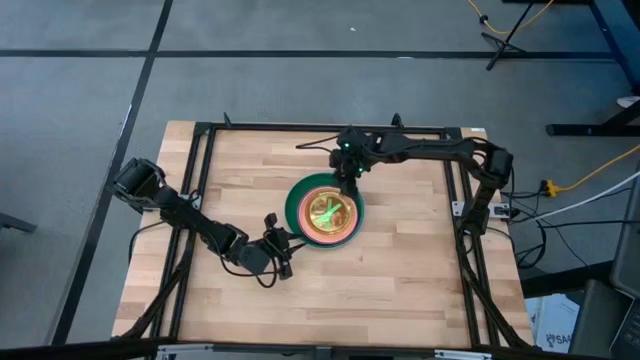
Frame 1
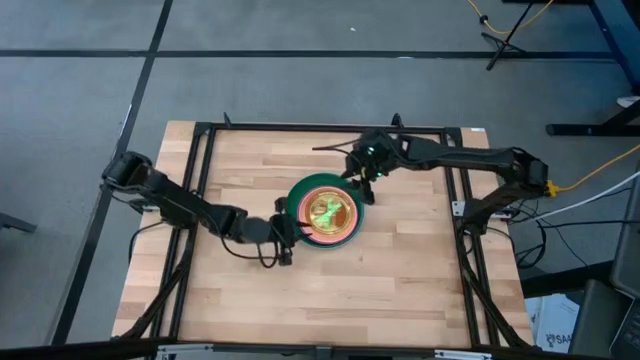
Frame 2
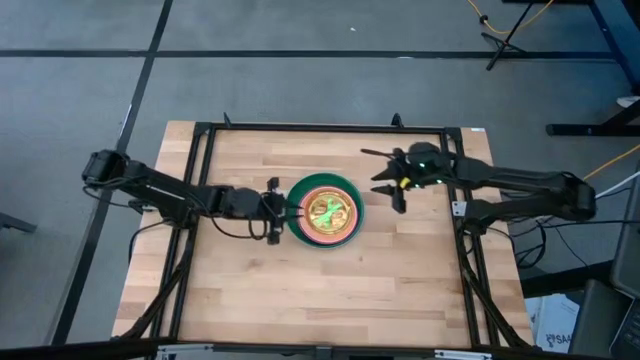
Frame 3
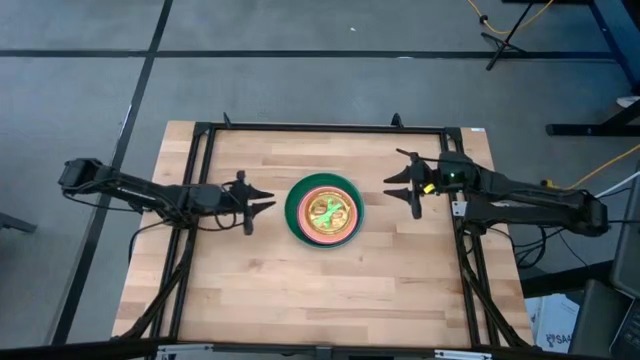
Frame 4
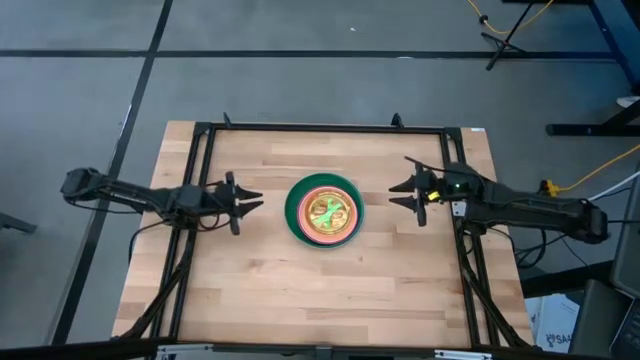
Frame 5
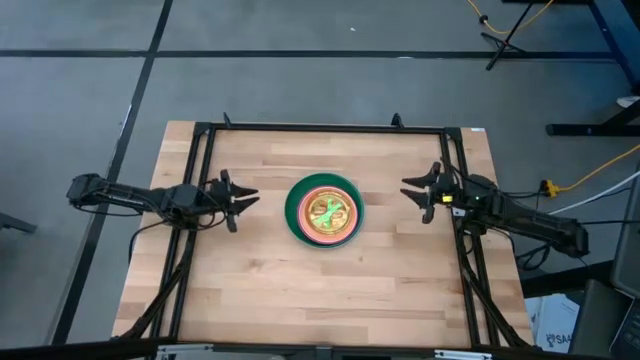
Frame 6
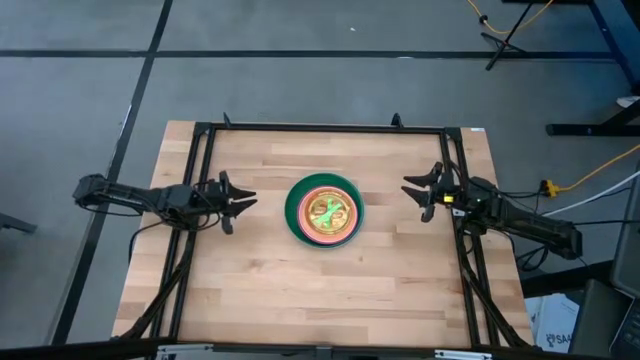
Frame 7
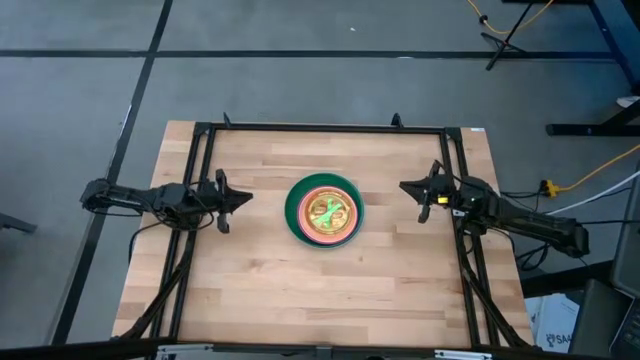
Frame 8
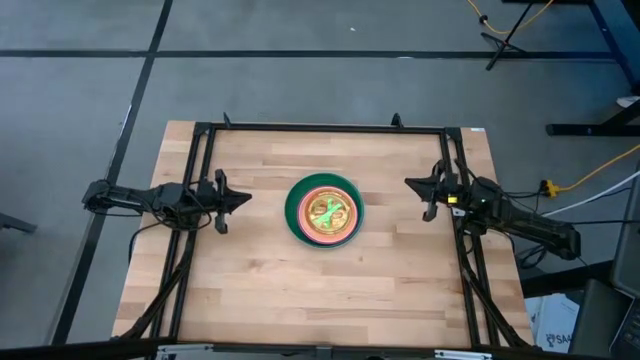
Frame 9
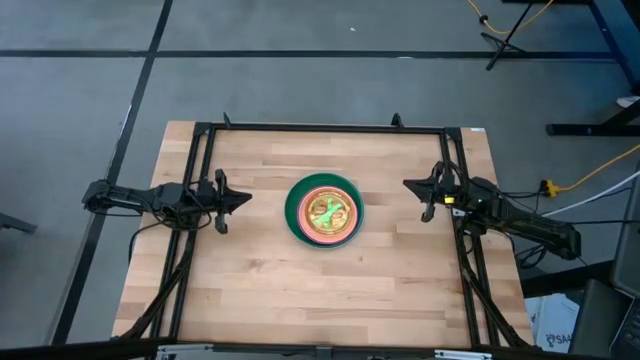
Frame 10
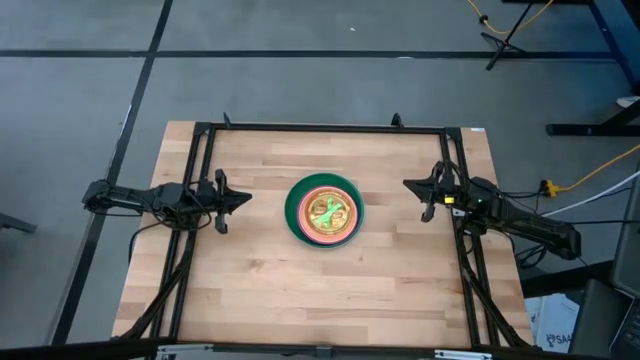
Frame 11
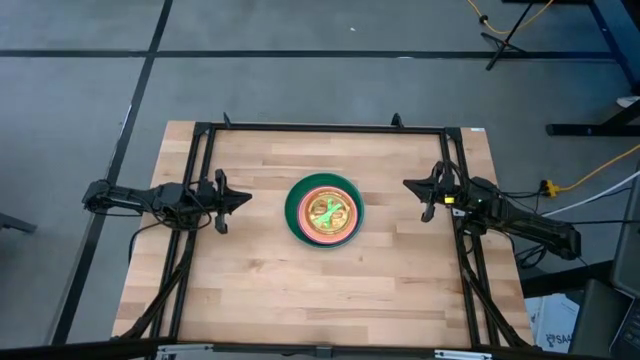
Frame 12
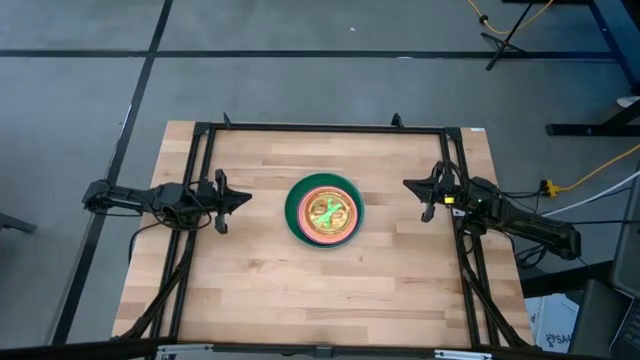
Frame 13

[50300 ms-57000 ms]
Task: Stack plastic plates
Return to Home Position

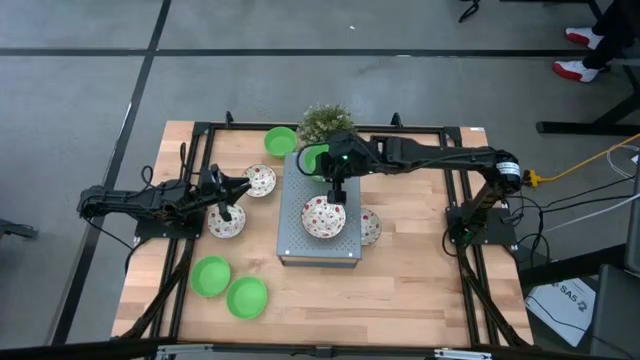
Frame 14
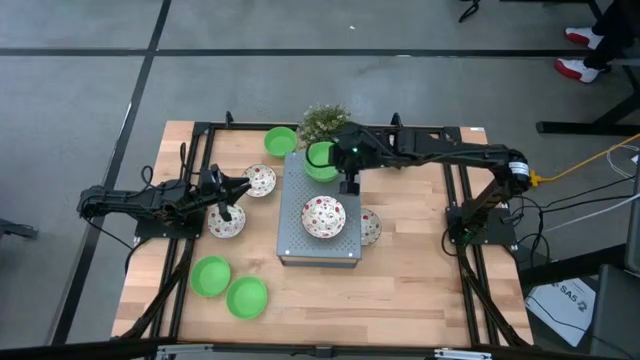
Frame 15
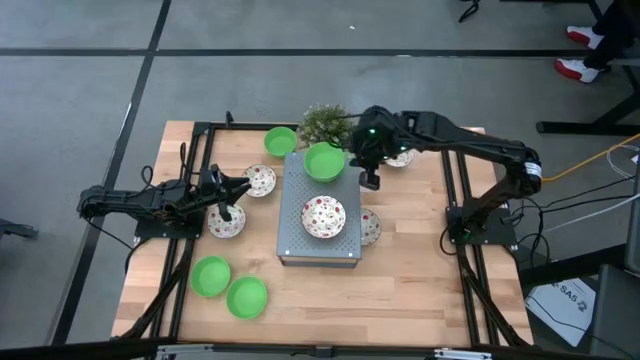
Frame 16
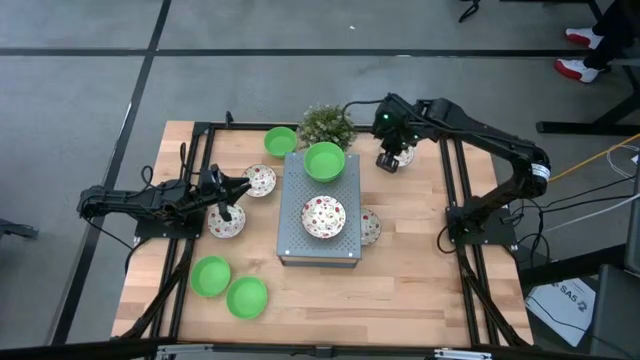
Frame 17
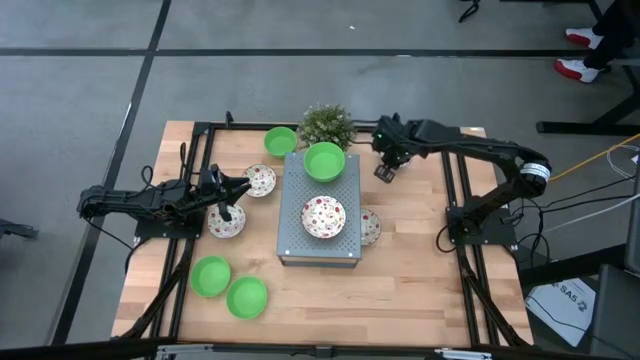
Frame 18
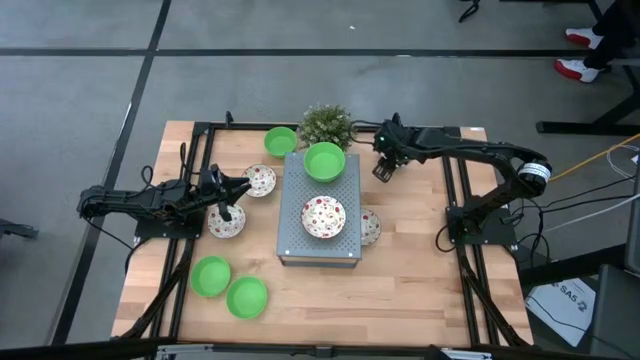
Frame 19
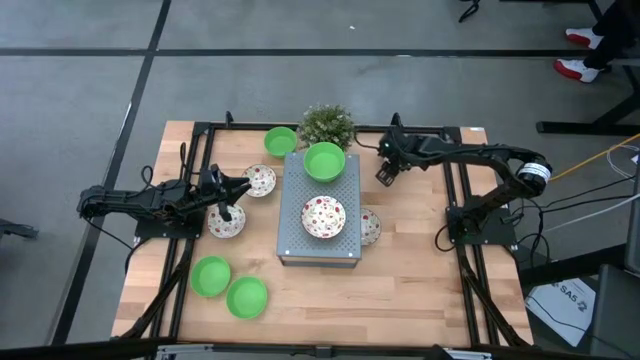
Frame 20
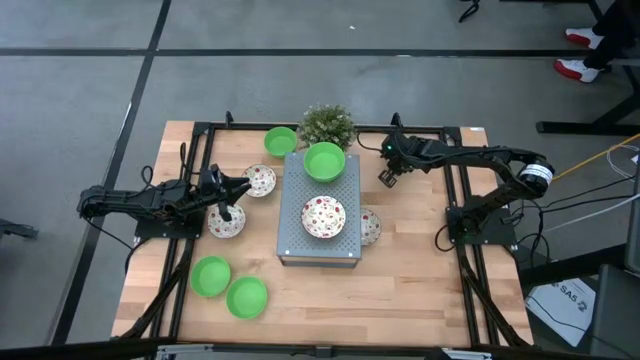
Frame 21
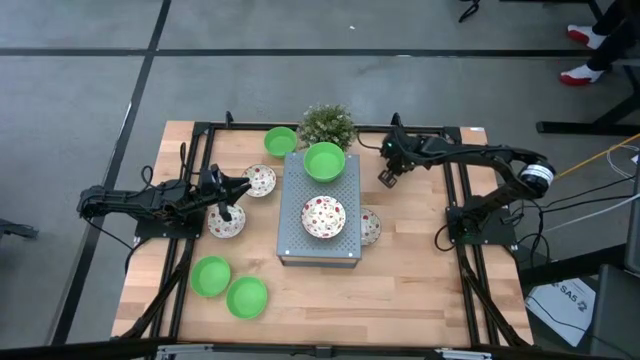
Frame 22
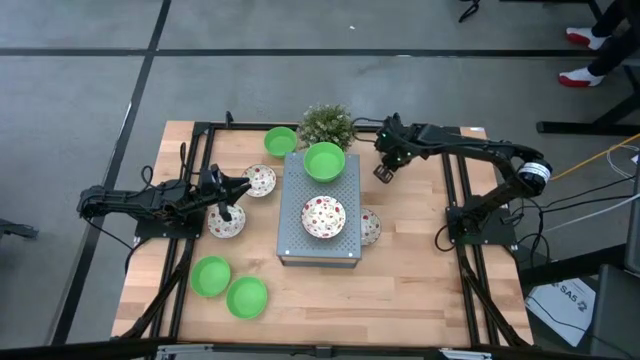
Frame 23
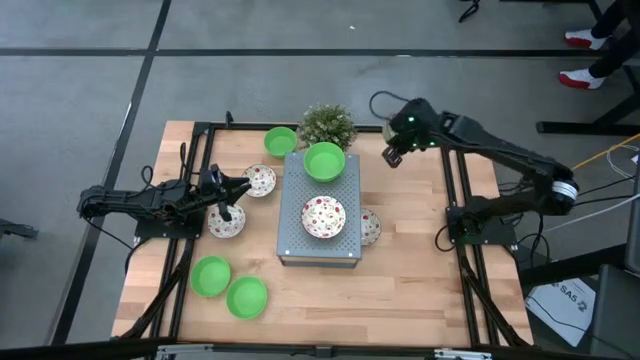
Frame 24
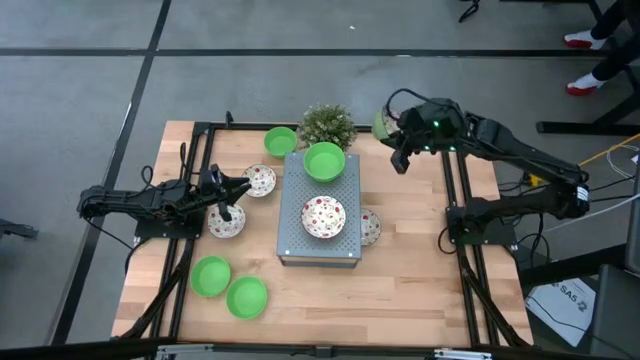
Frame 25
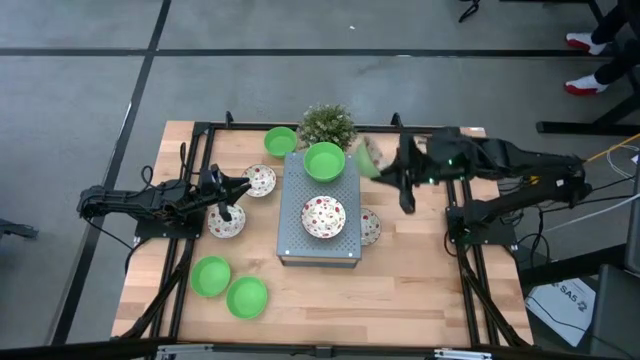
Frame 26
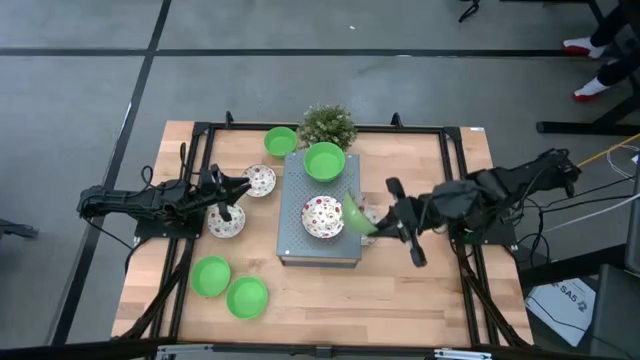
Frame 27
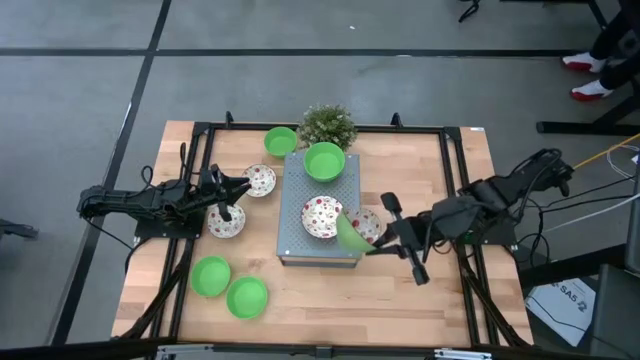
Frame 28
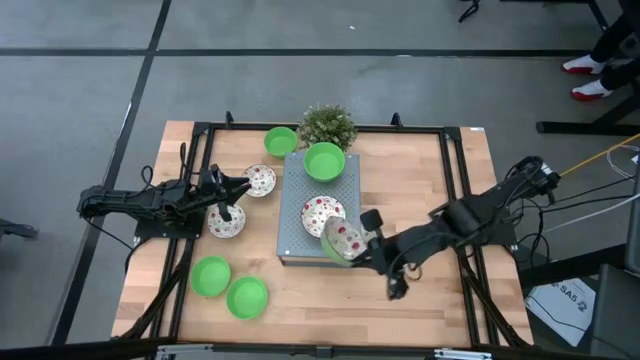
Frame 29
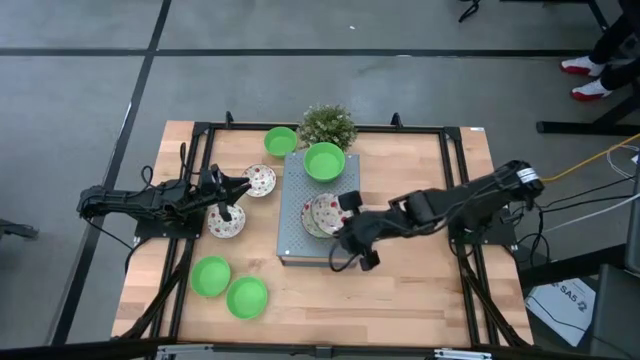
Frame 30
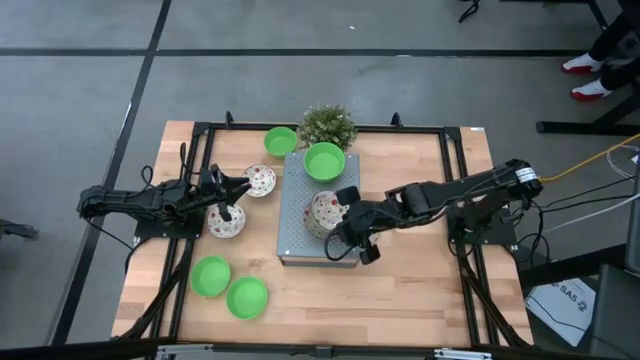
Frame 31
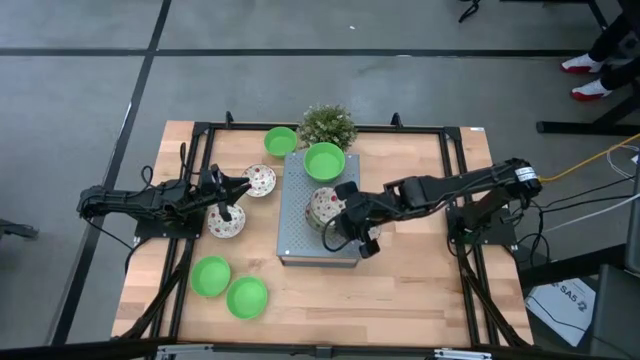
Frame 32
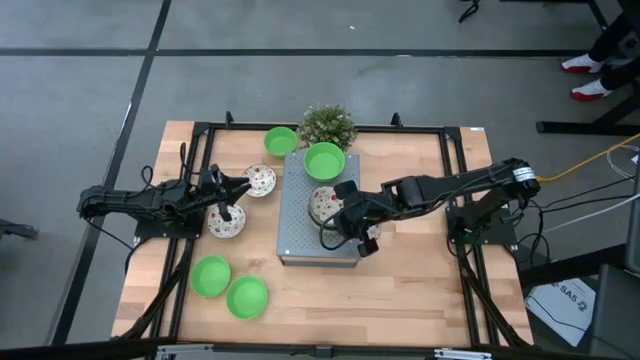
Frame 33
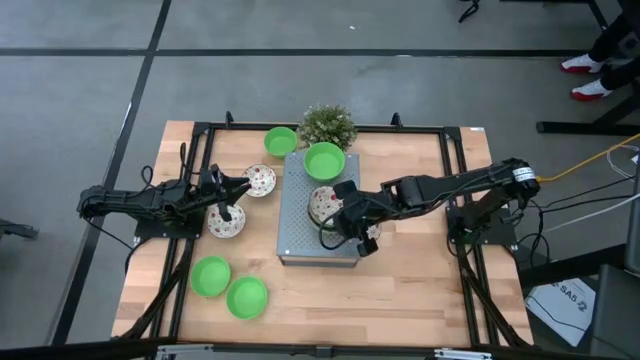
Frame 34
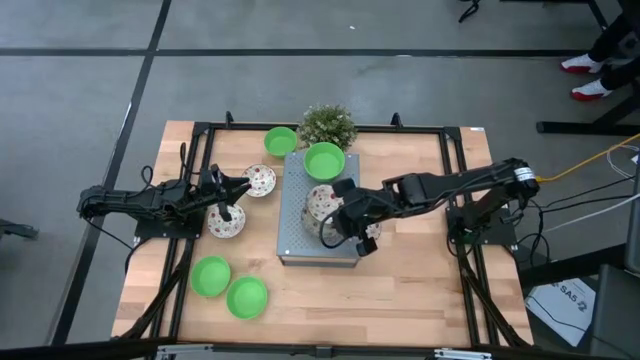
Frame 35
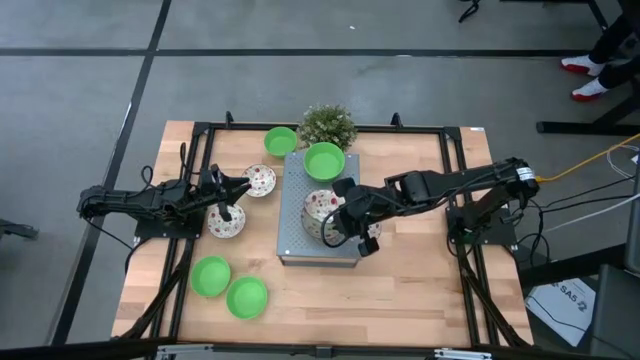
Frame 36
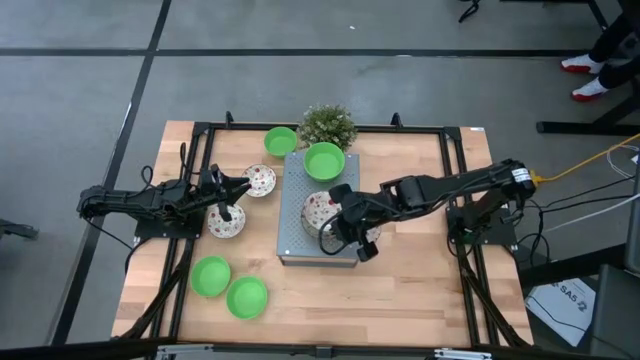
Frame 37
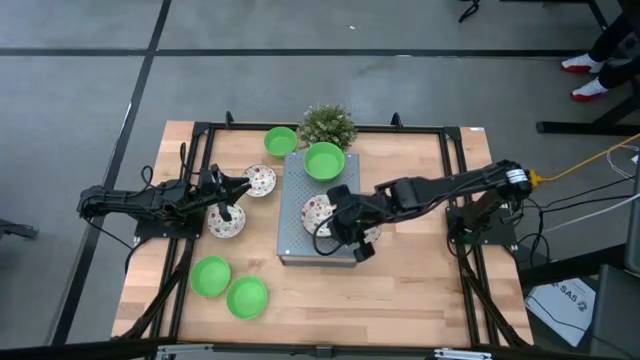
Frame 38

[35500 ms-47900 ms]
Task: Pick & Place Mini bowls
Stack the red patterned bowl on the red patterned bowl on the shelf

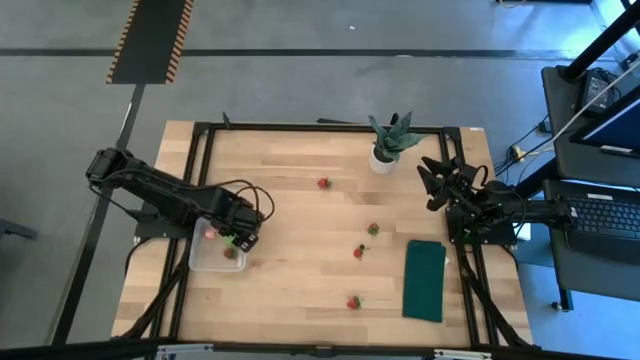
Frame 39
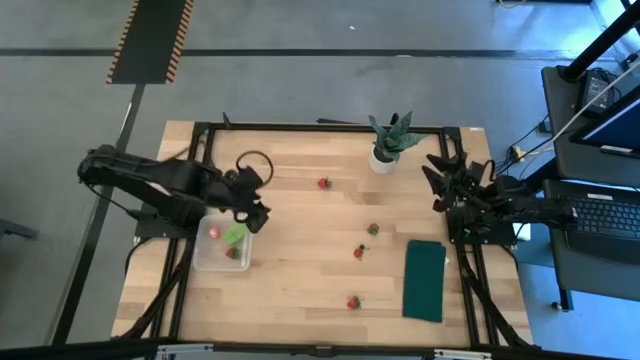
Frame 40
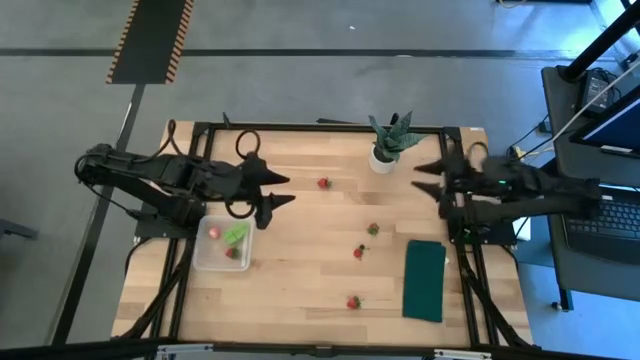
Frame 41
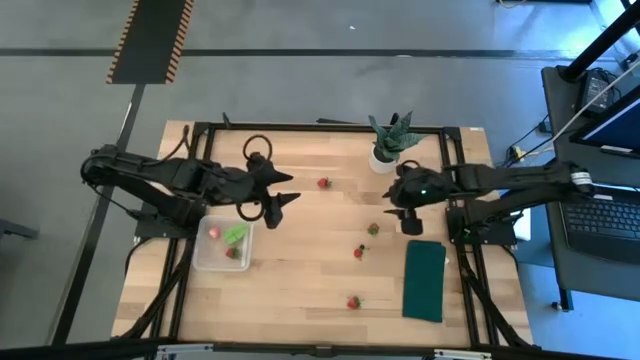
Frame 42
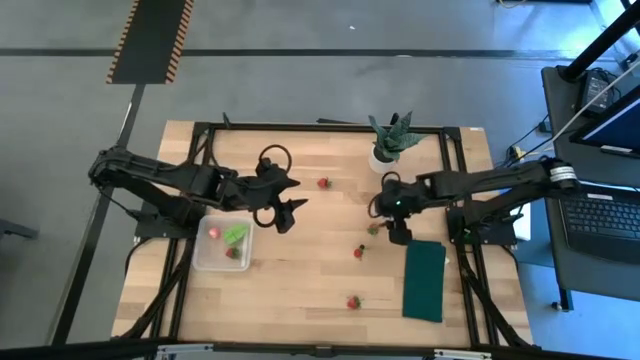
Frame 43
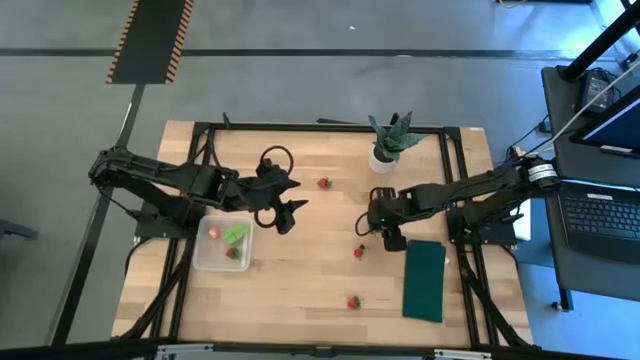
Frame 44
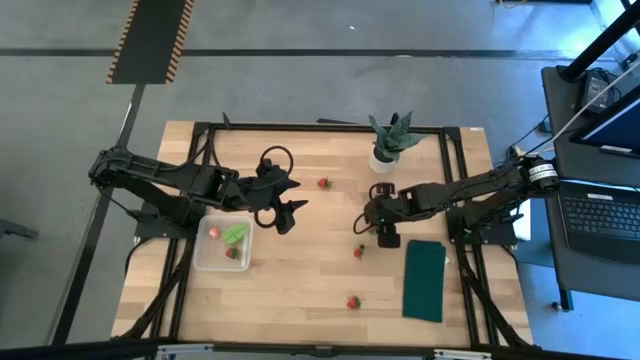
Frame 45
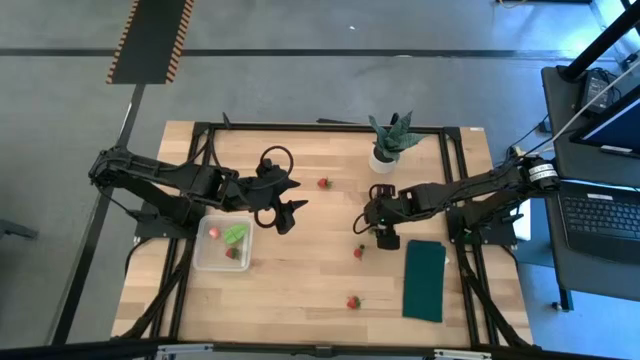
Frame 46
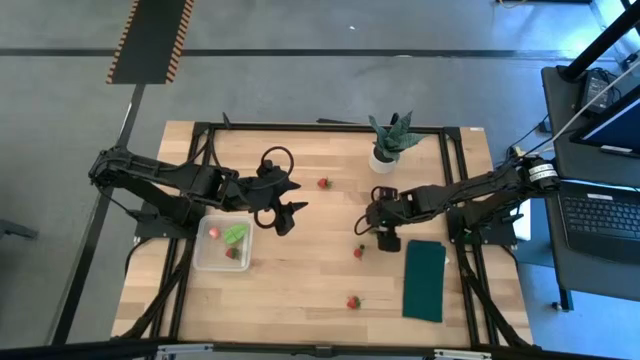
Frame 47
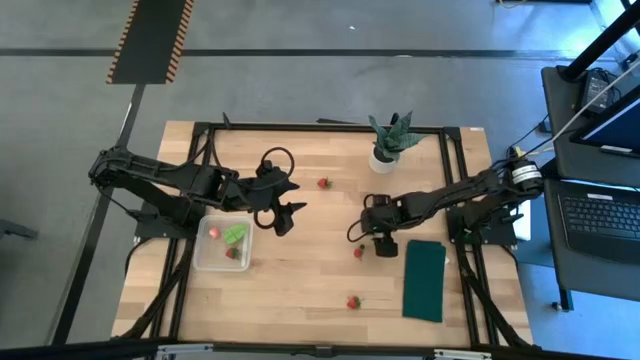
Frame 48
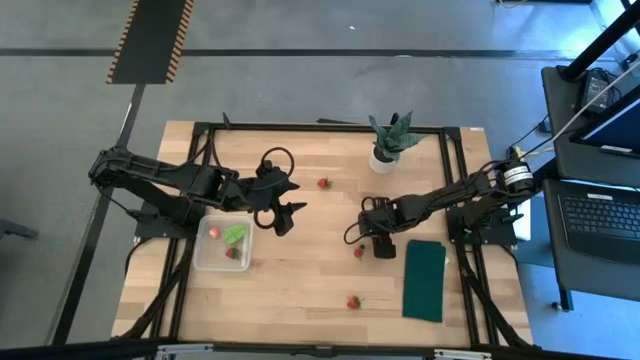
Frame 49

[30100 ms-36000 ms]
Task: Pick and placing Produce into tupperware
Put the red strawberry into the transparent bin
